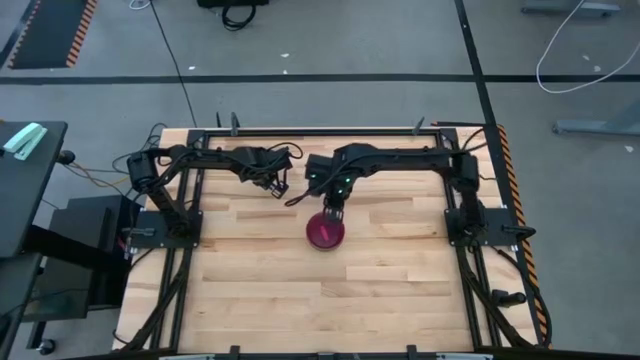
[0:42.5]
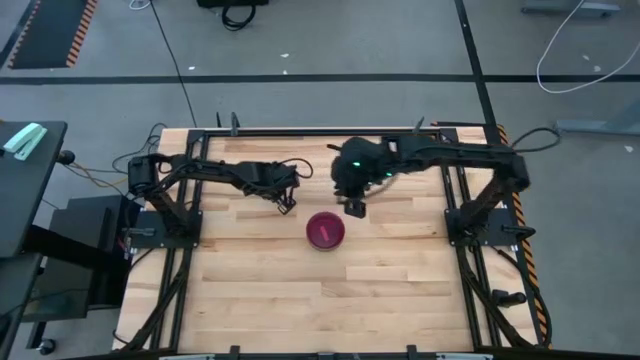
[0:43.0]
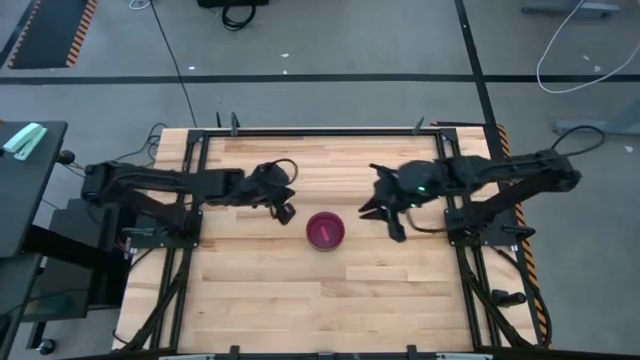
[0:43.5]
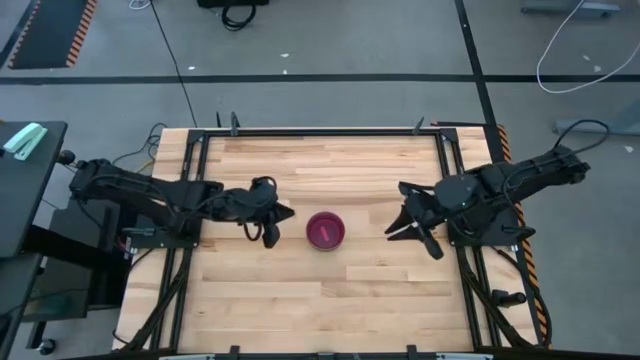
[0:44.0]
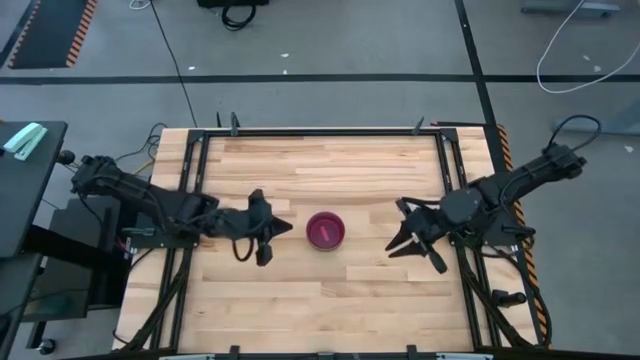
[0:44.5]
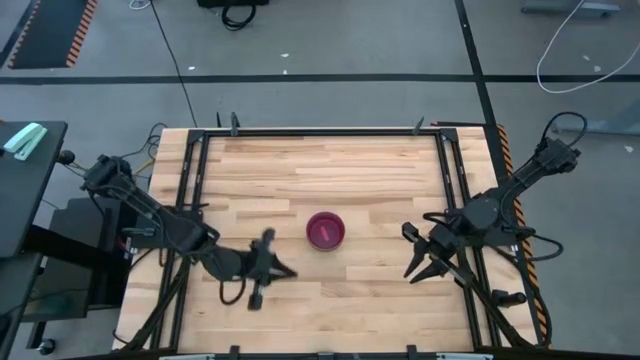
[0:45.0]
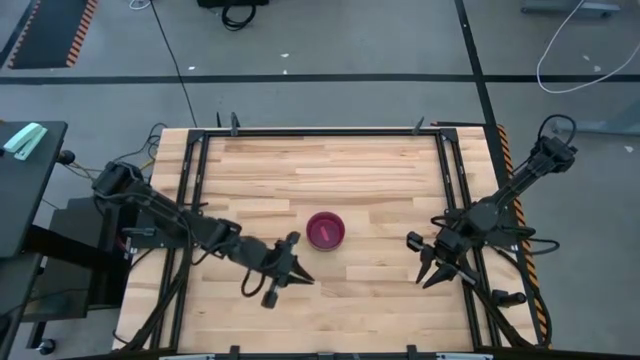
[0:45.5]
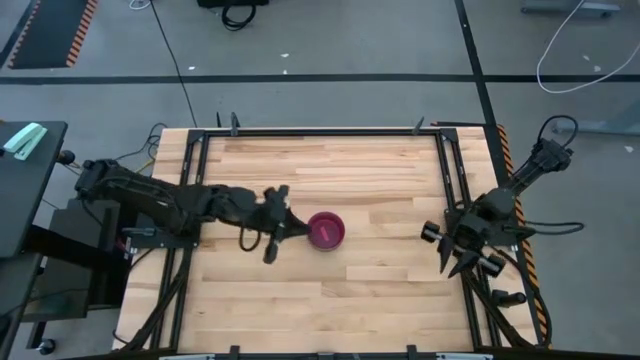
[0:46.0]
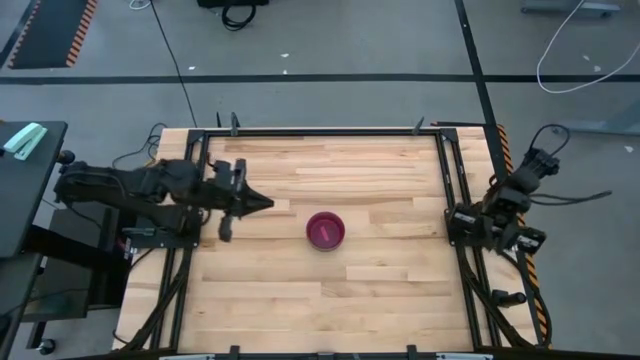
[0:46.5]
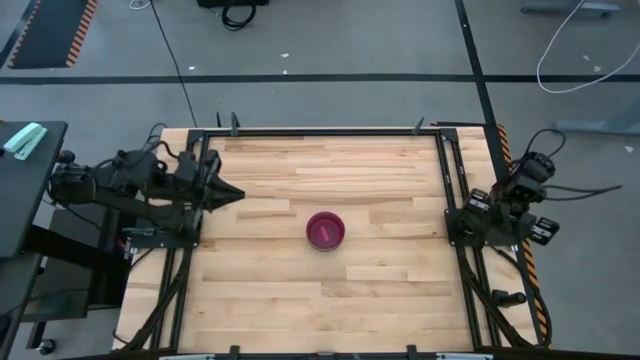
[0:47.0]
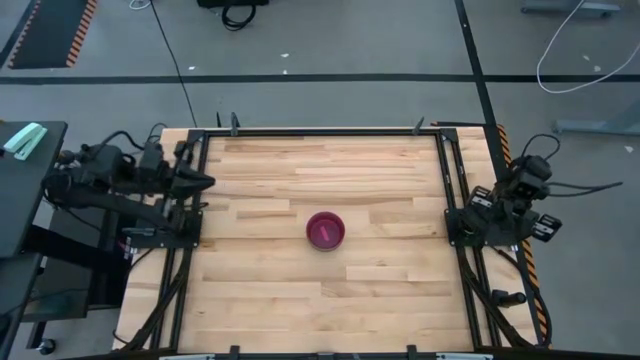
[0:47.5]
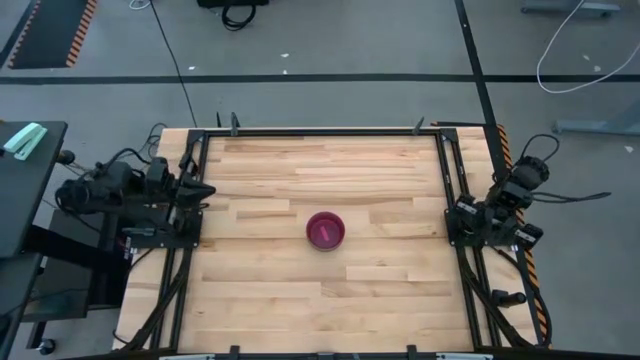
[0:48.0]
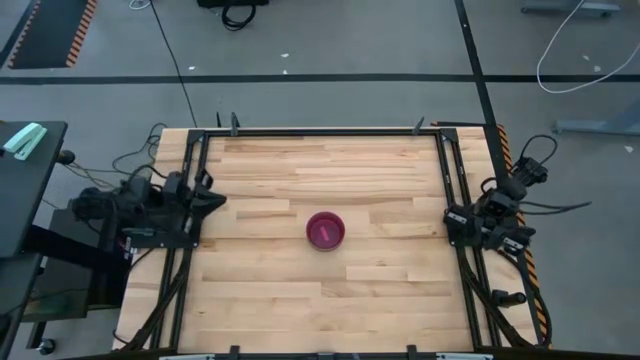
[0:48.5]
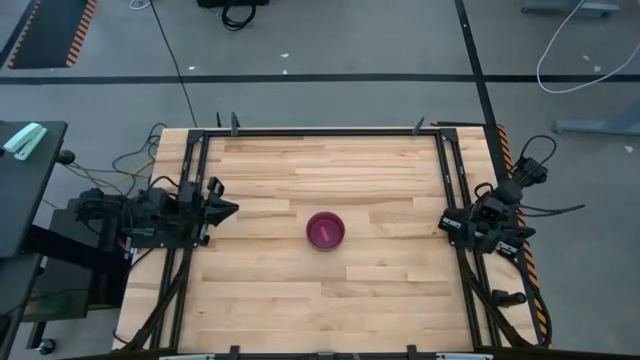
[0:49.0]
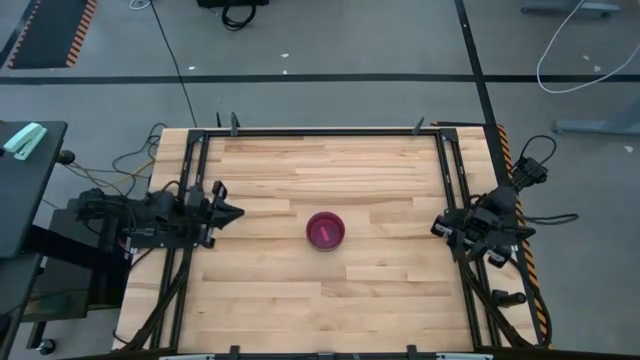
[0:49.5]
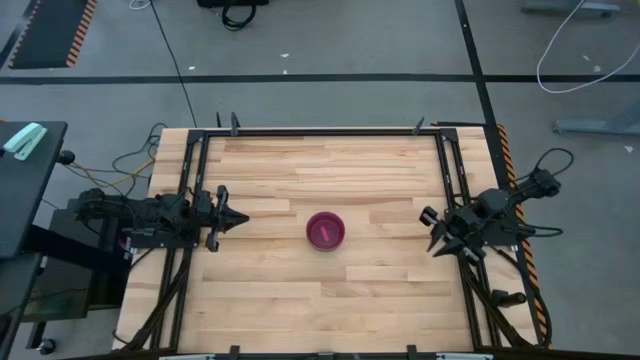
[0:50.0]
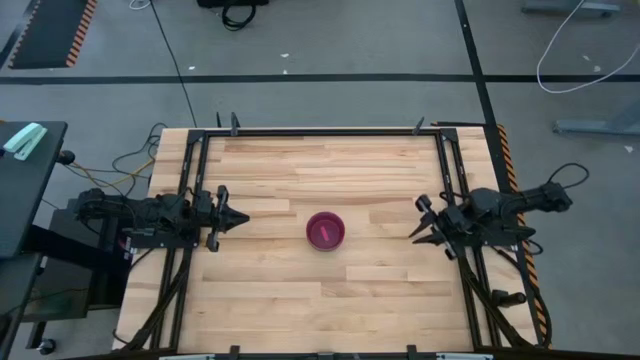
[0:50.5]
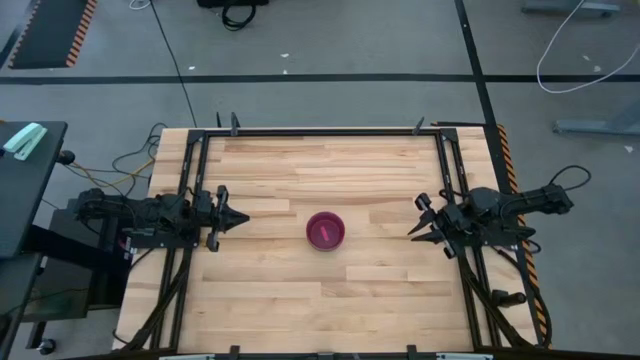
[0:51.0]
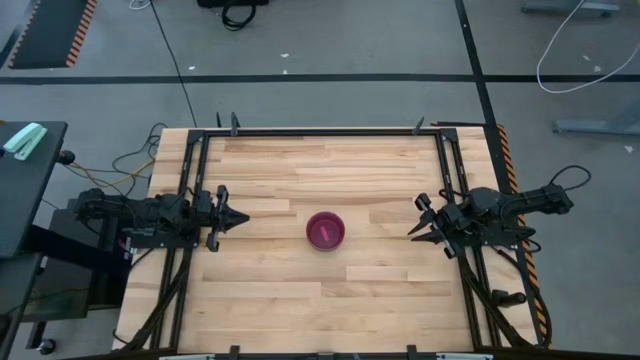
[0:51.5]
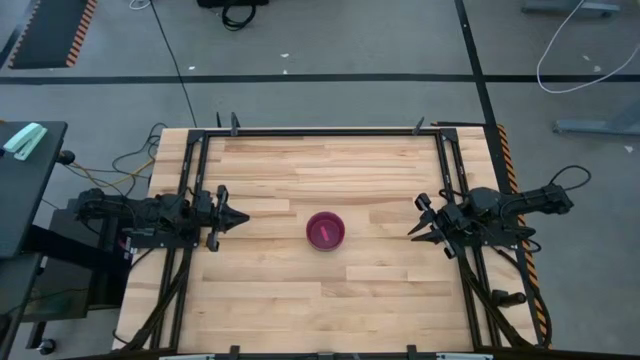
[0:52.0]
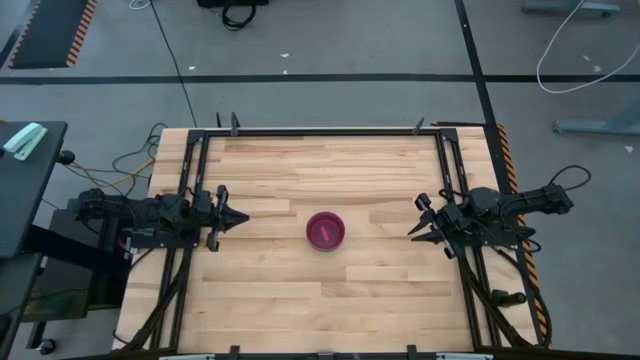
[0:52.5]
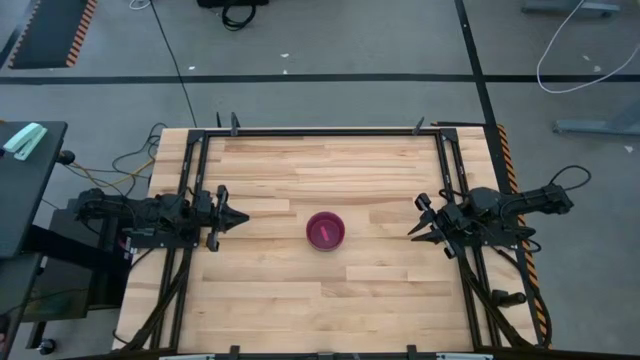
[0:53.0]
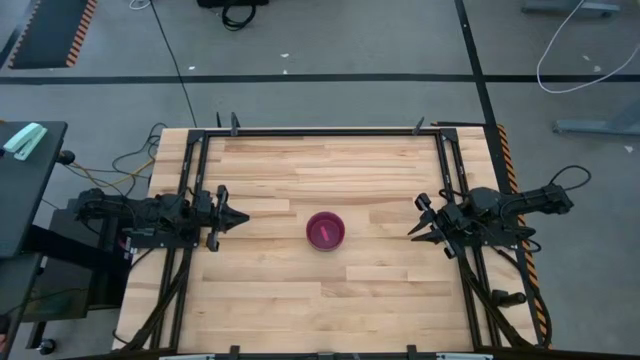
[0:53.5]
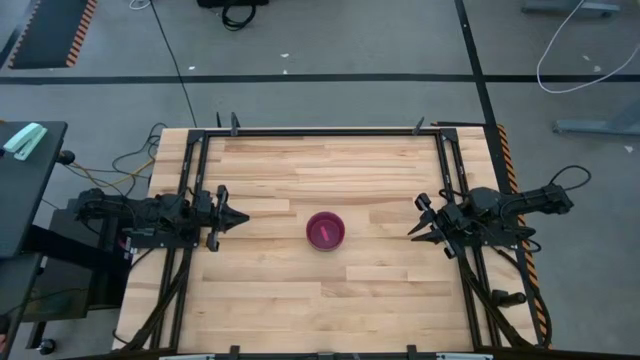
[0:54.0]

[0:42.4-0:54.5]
Task: Nest bowls inside each other
Return to Home Position

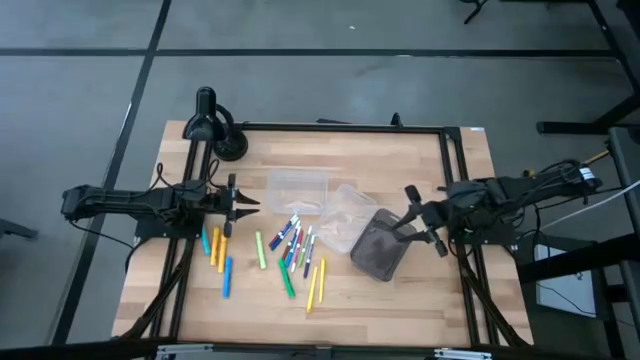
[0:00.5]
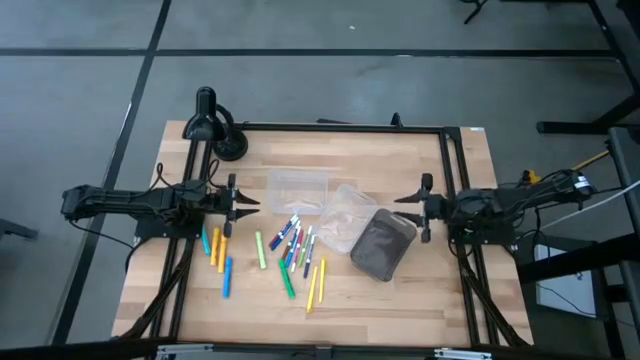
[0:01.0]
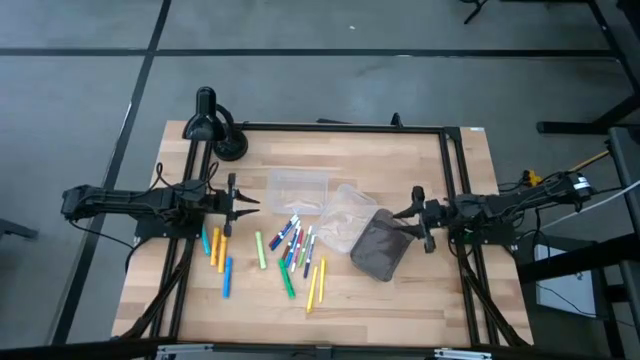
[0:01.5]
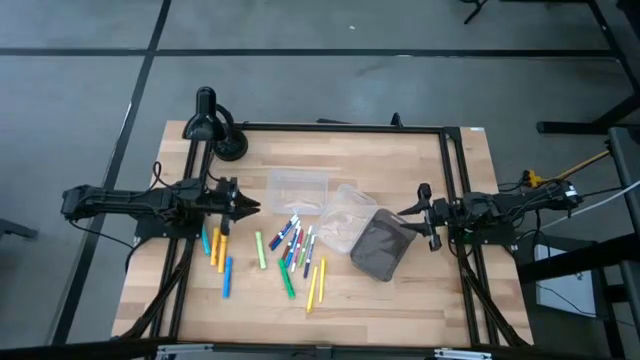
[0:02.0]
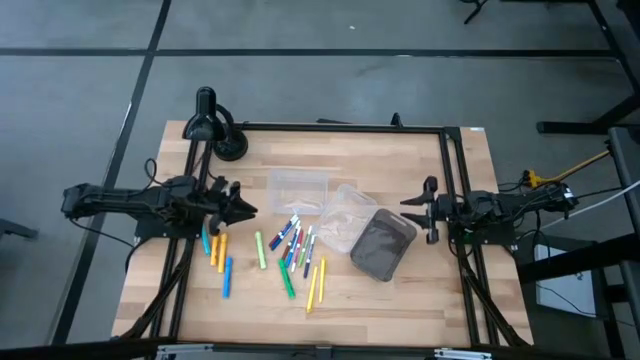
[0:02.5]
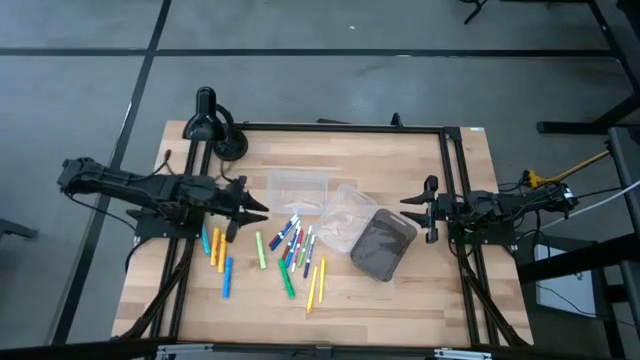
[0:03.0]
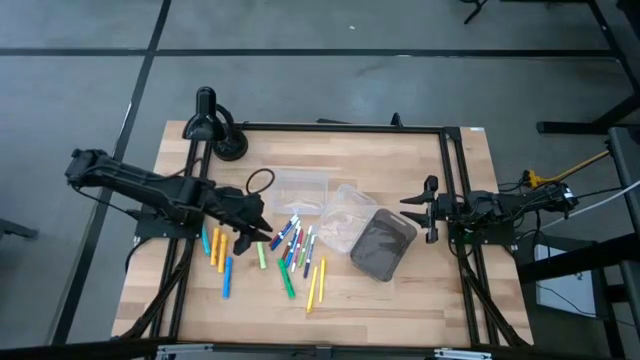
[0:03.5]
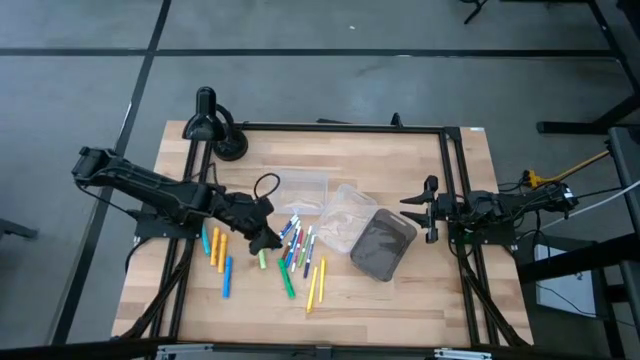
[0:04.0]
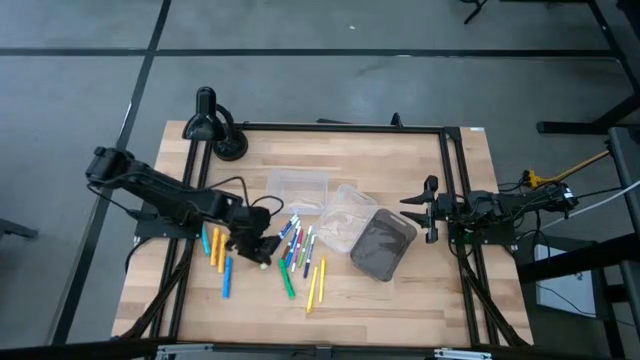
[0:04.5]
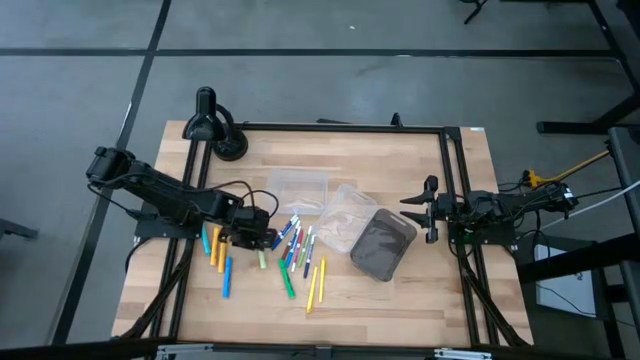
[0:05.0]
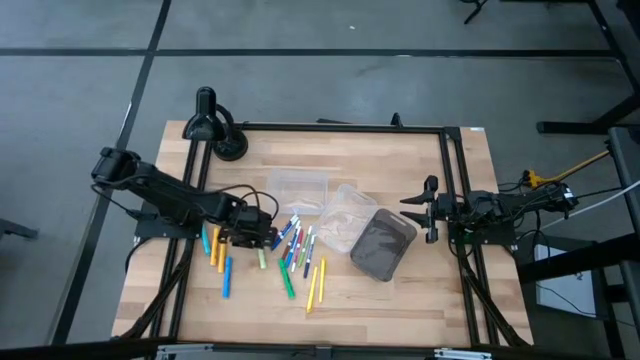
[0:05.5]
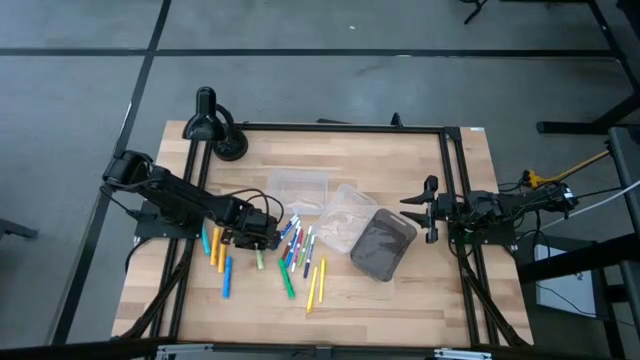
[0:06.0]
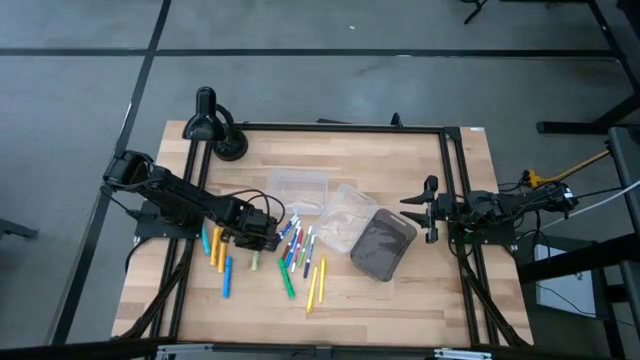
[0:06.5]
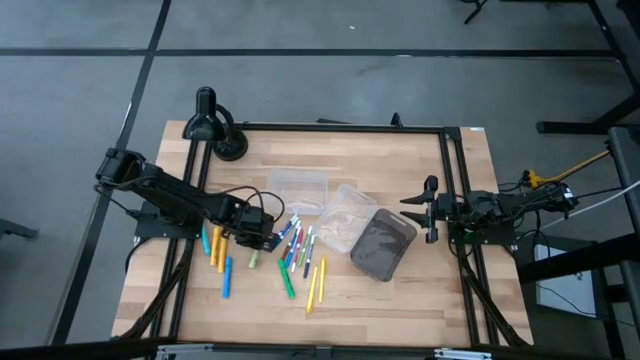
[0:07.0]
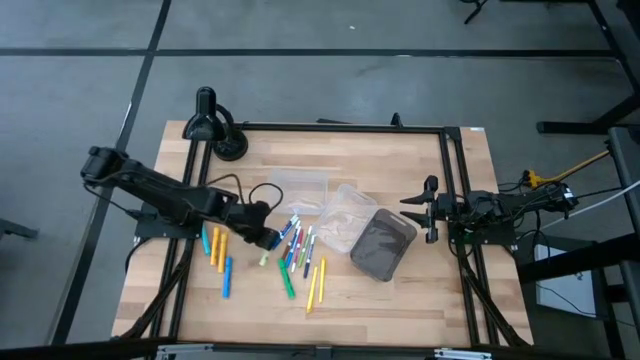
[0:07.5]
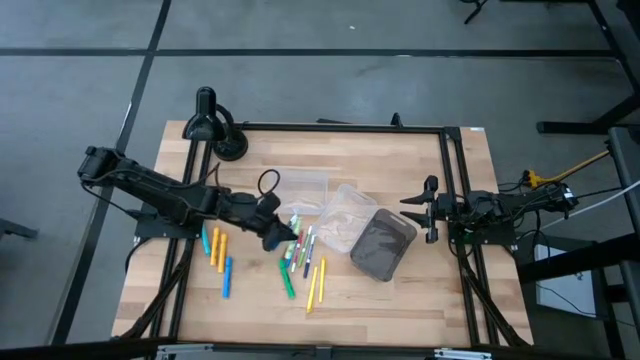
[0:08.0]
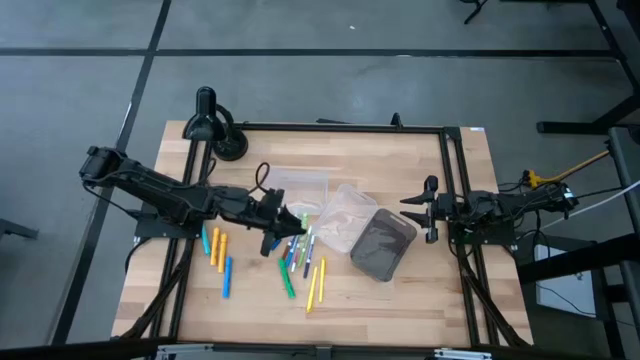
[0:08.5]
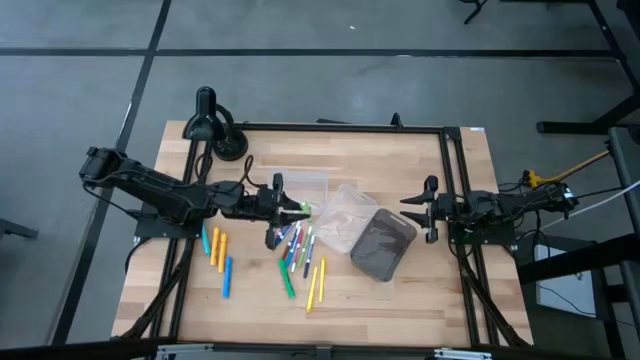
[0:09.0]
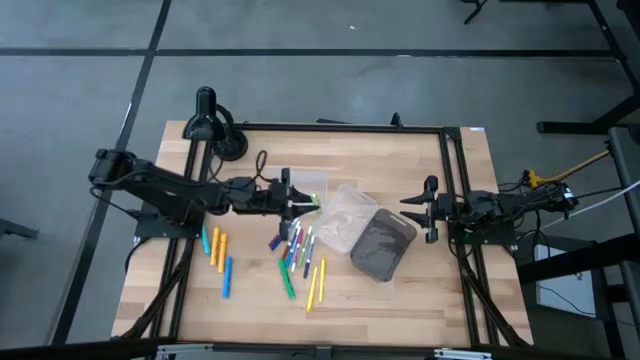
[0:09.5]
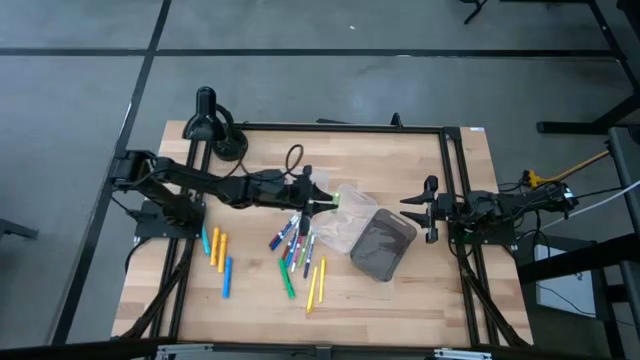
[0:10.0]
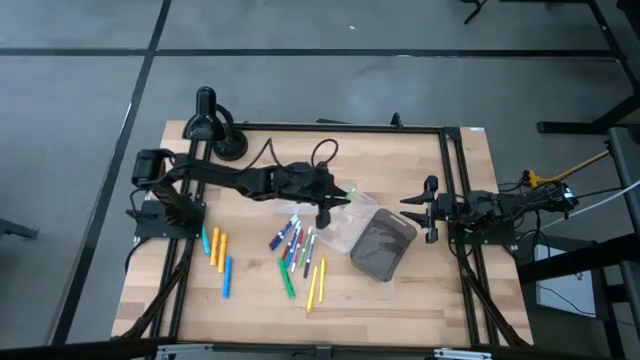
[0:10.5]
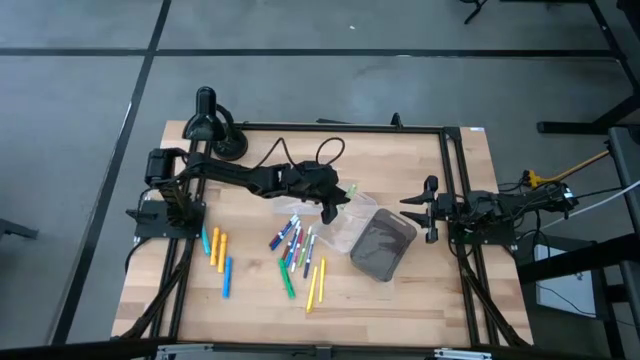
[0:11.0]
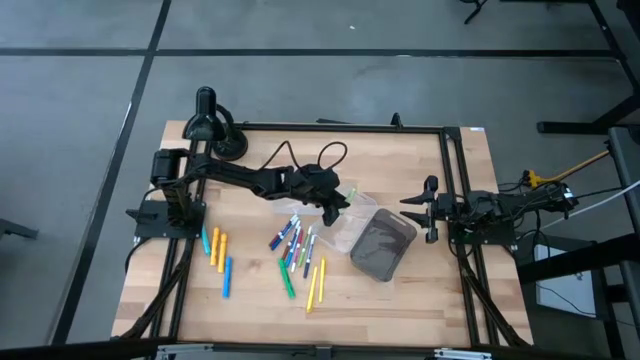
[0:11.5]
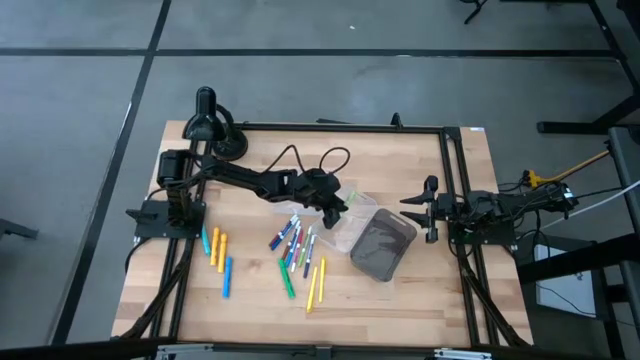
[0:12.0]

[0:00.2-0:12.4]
Task: Pick & Place Markers
Put the light green highlighter pen into the right transparent bin
